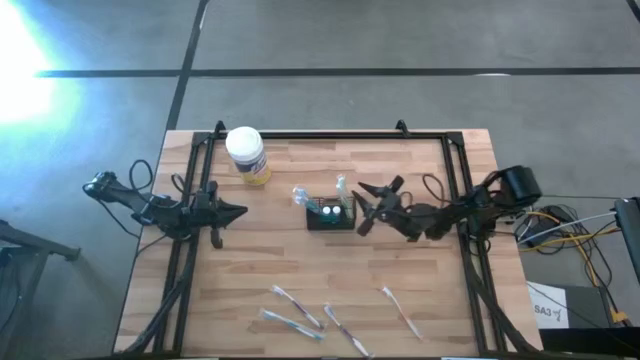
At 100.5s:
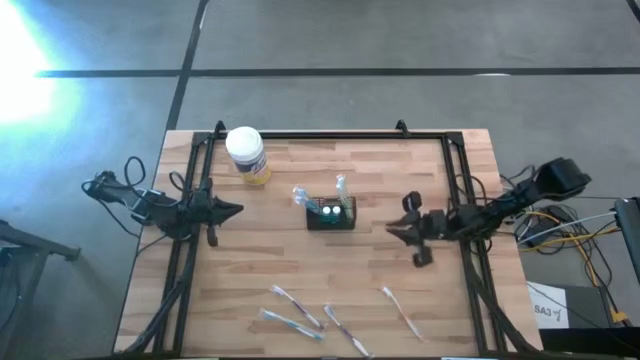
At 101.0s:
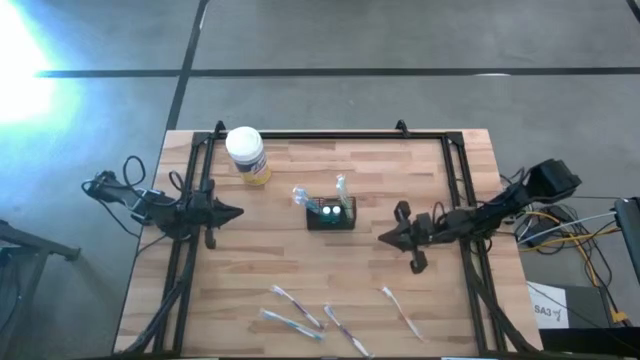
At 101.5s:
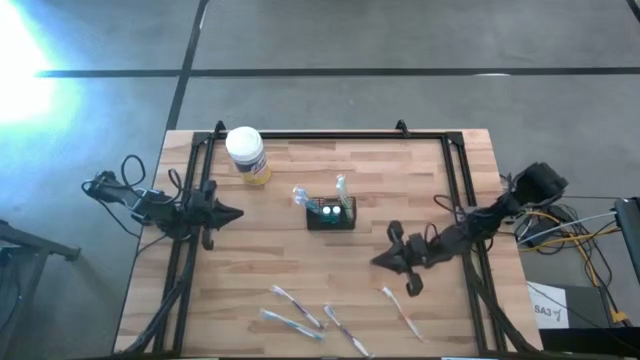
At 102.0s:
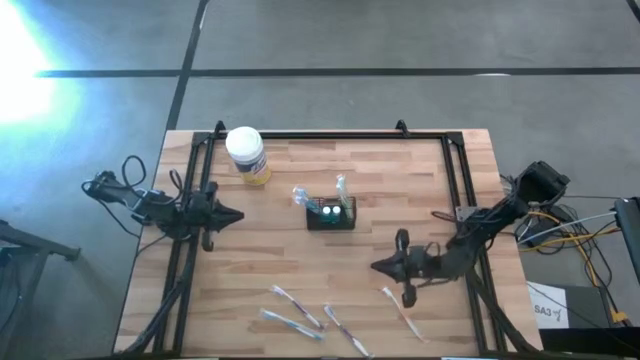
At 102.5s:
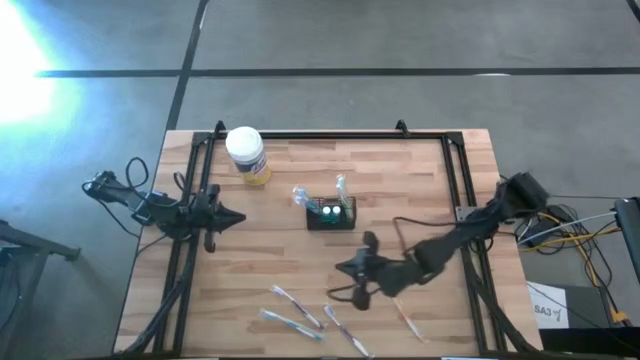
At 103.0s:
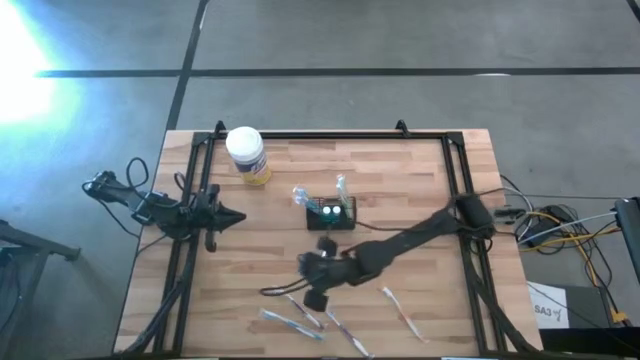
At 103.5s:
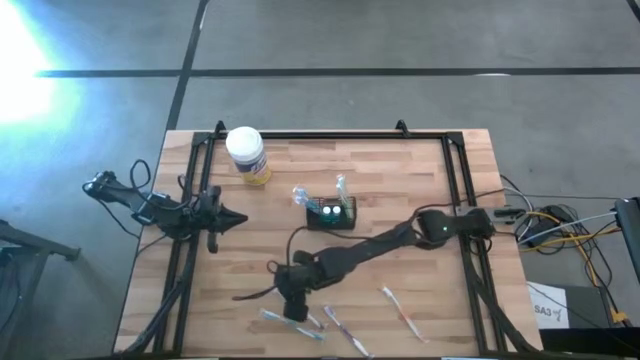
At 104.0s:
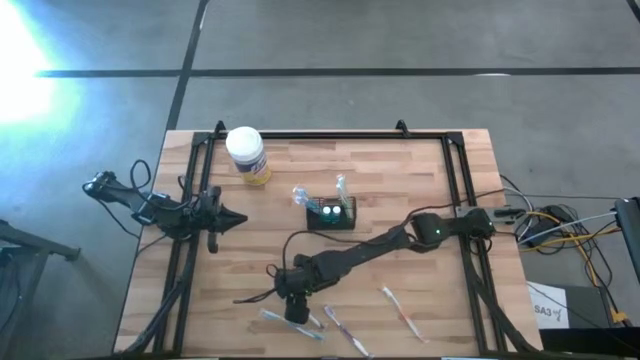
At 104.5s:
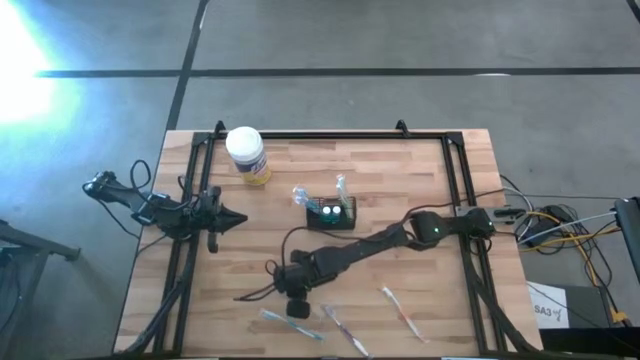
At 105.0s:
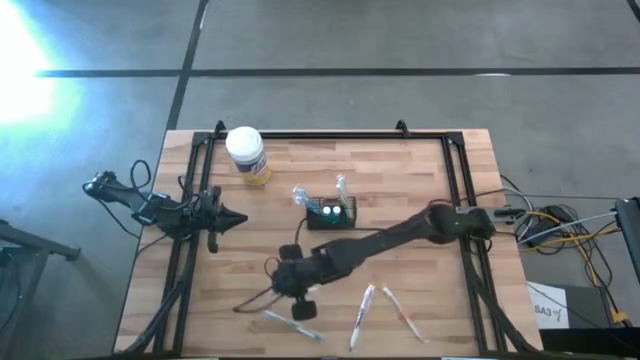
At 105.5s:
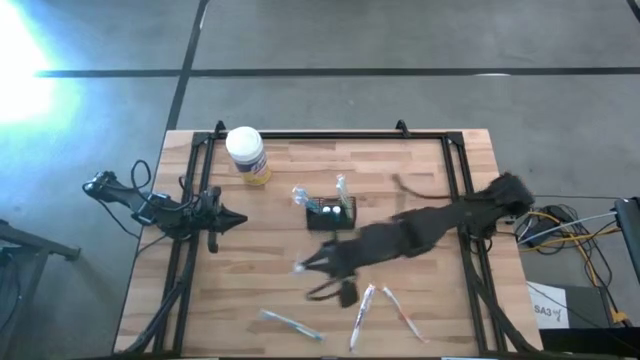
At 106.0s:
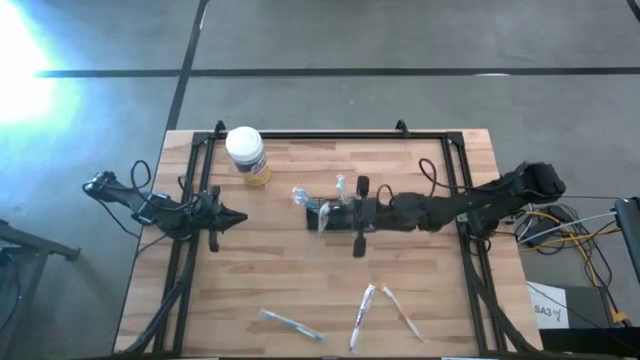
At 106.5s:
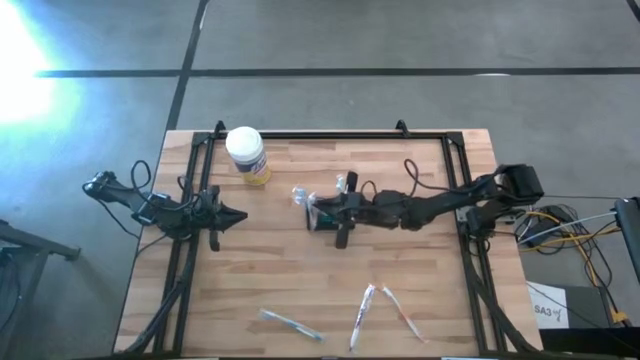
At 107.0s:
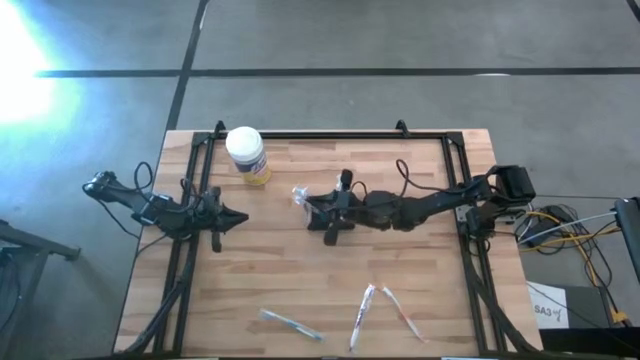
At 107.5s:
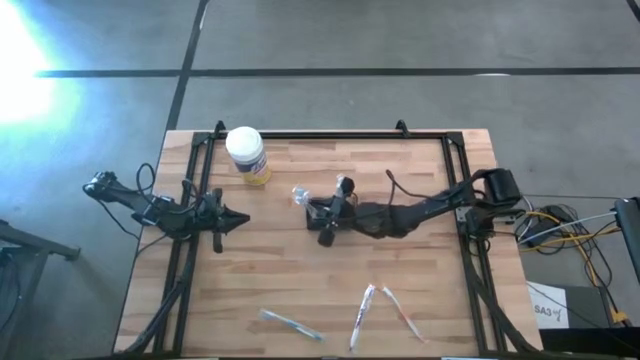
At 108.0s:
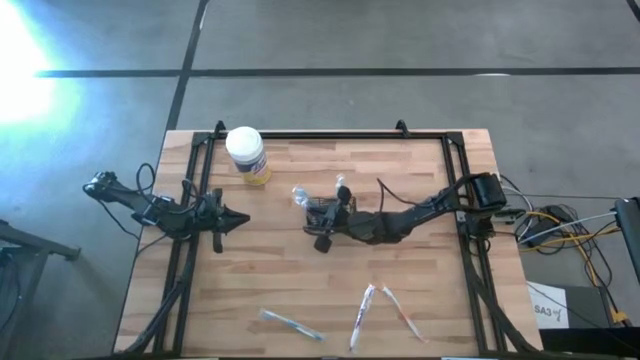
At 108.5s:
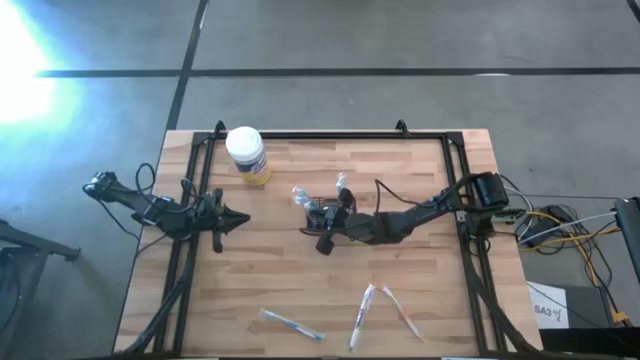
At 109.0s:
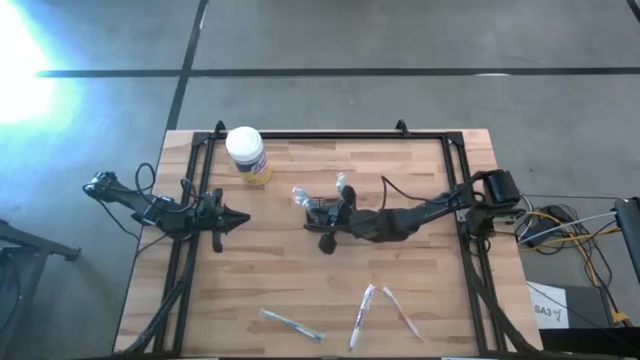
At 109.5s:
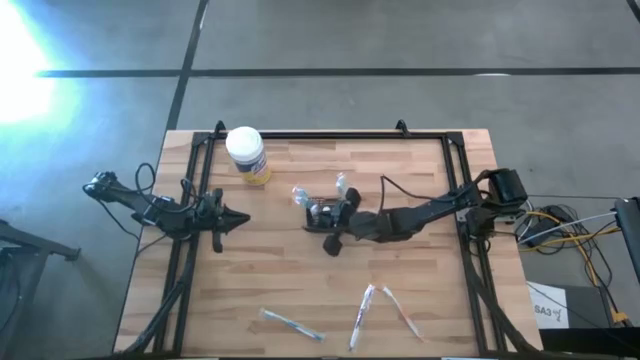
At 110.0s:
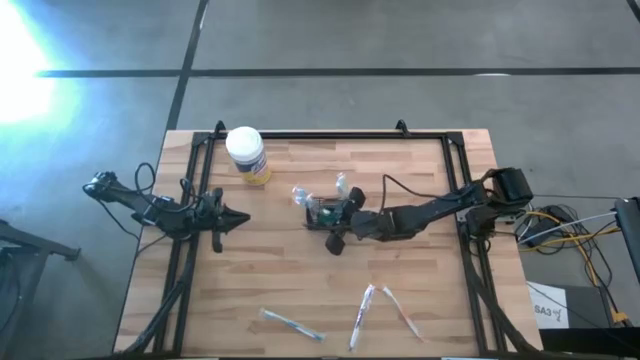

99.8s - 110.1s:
Task: Pick & Place toothbrushing station
Put the left purple toothbrush into the black mesh organizer

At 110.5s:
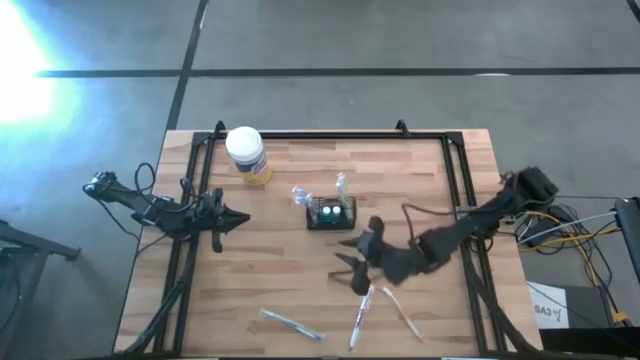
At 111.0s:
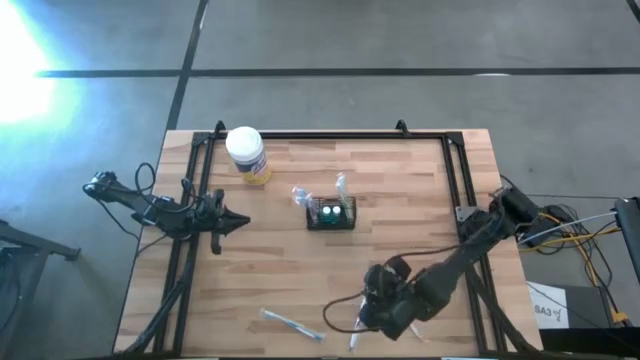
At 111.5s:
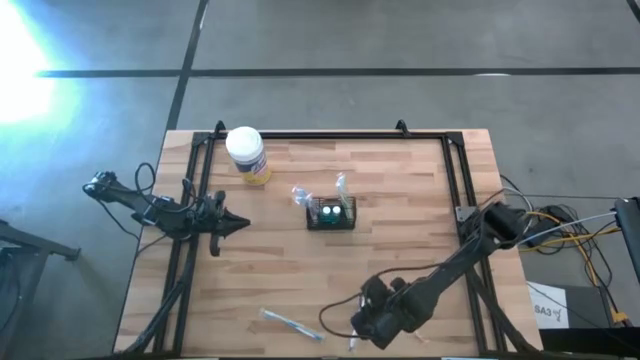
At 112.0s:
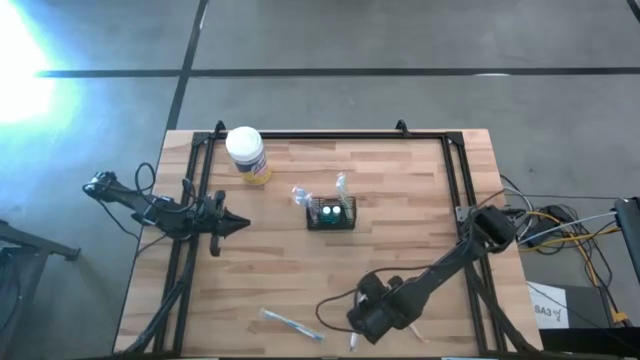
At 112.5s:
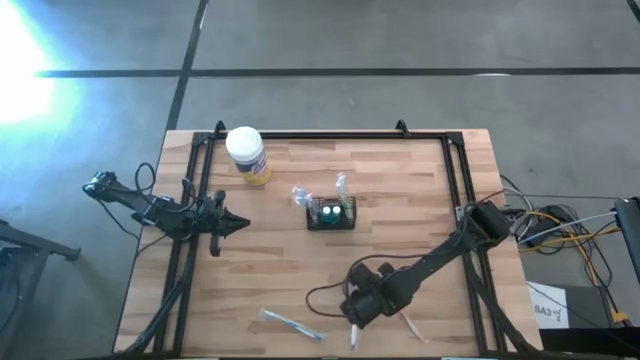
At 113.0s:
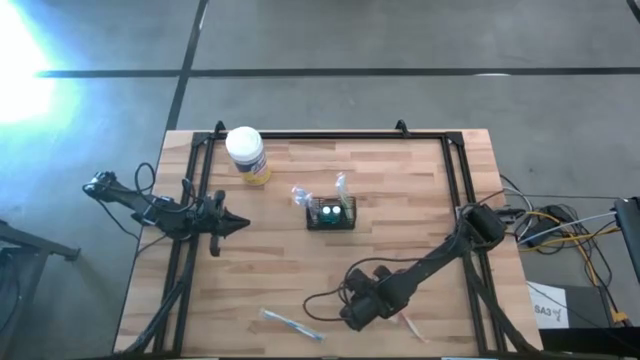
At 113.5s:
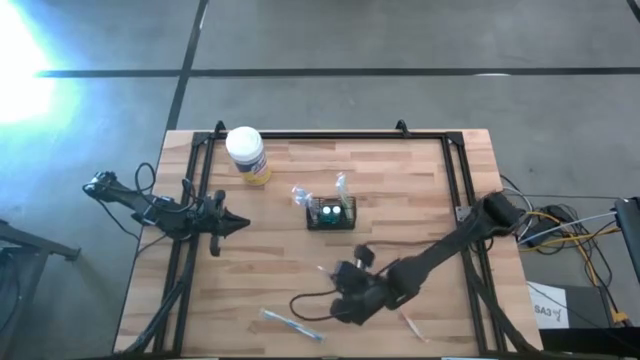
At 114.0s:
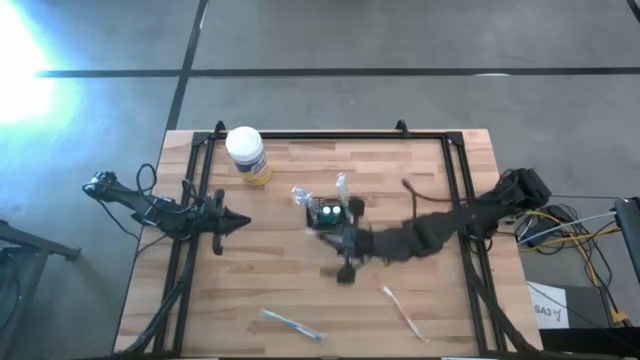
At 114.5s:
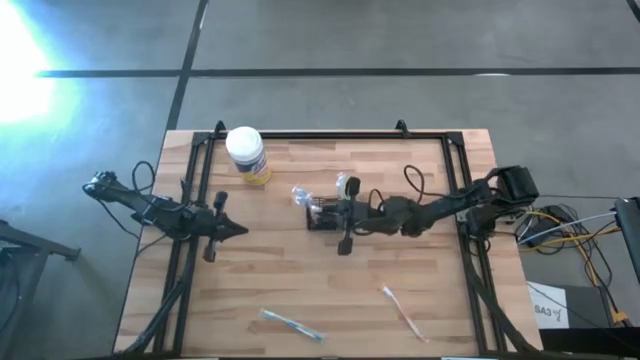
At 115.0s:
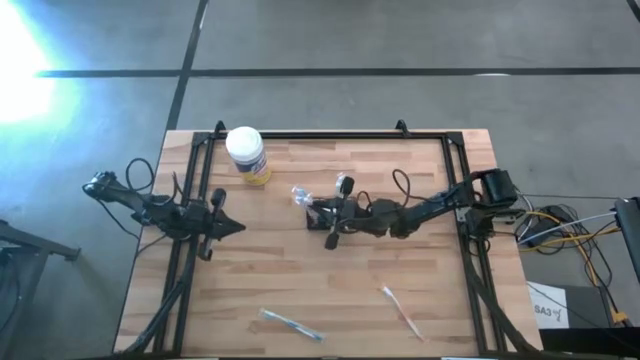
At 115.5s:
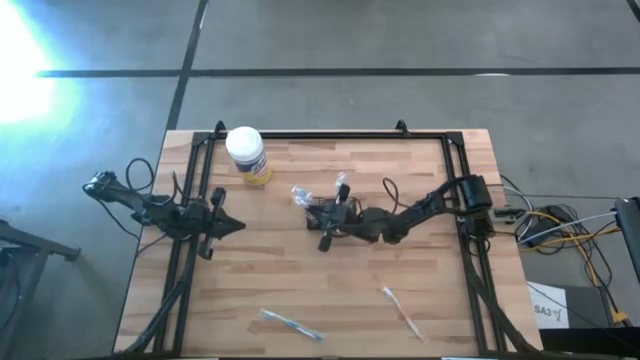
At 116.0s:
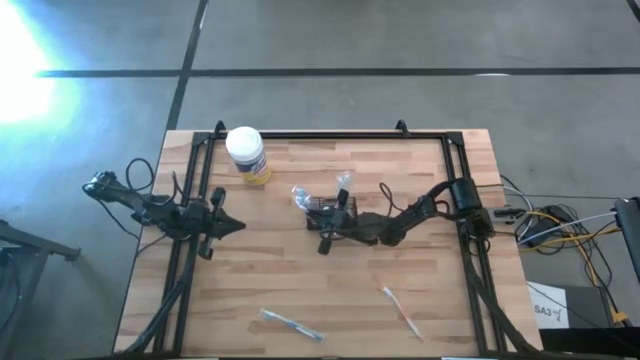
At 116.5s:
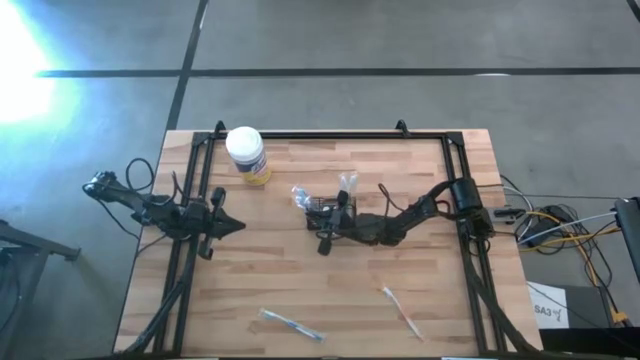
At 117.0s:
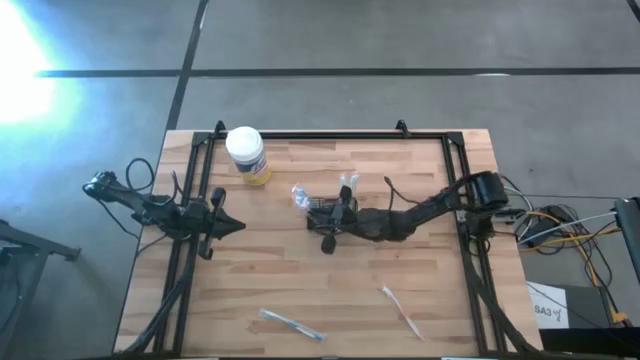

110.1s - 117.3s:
Put the purple toothbrush into the black mesh organizer
